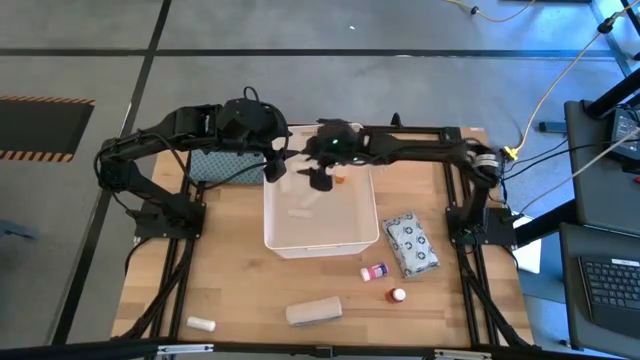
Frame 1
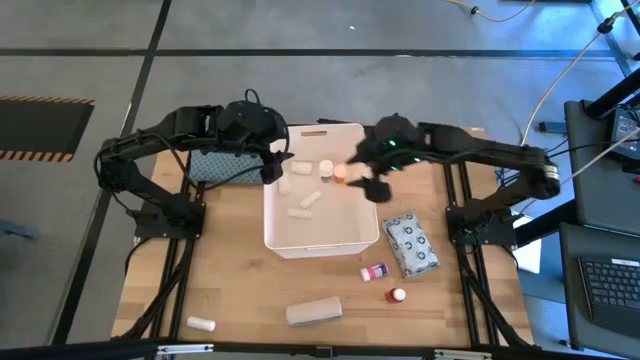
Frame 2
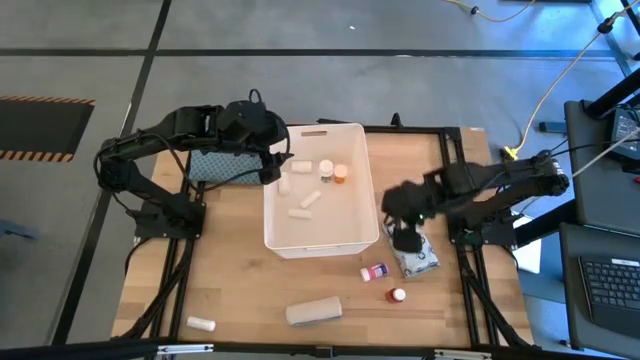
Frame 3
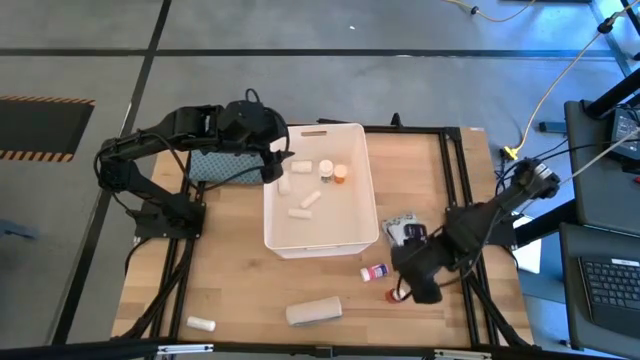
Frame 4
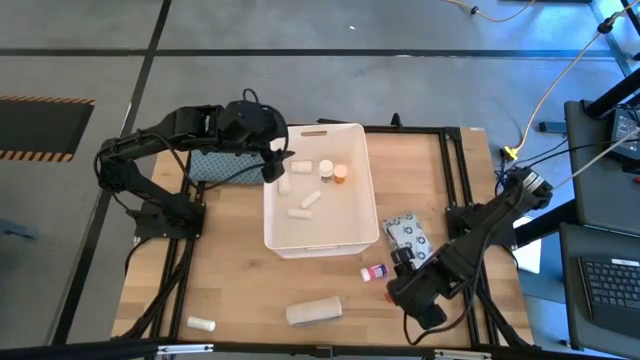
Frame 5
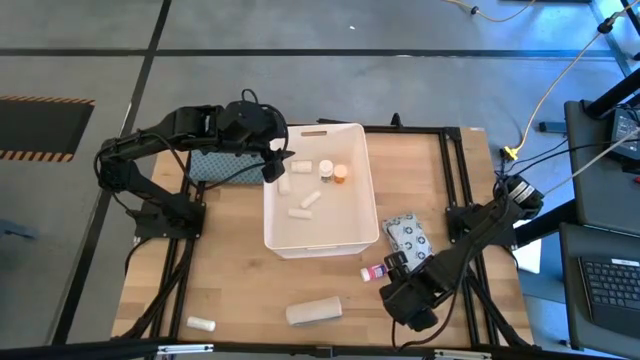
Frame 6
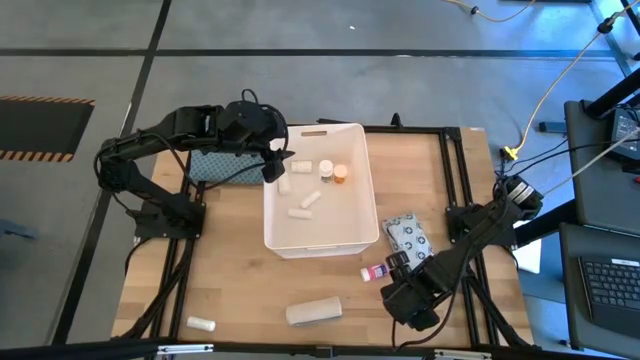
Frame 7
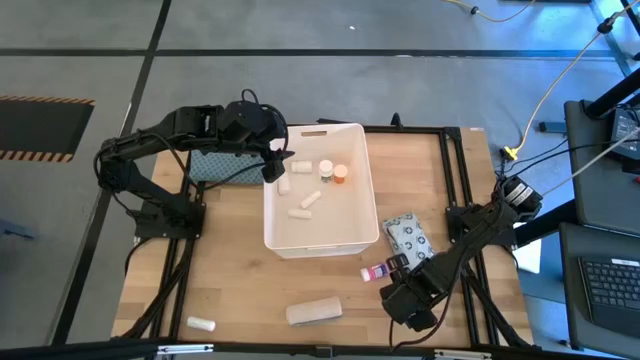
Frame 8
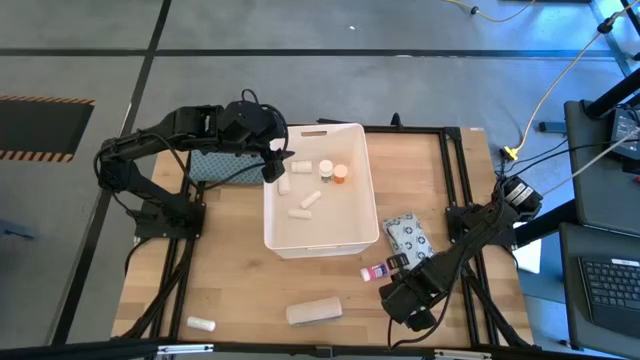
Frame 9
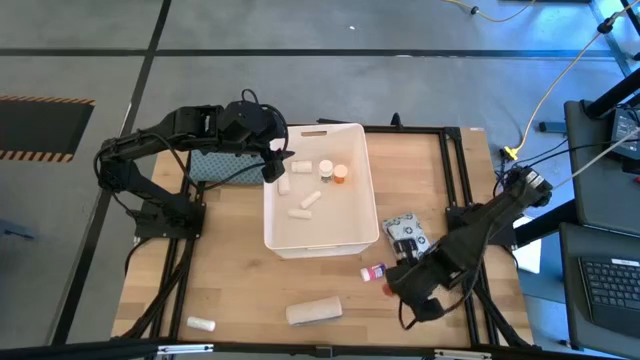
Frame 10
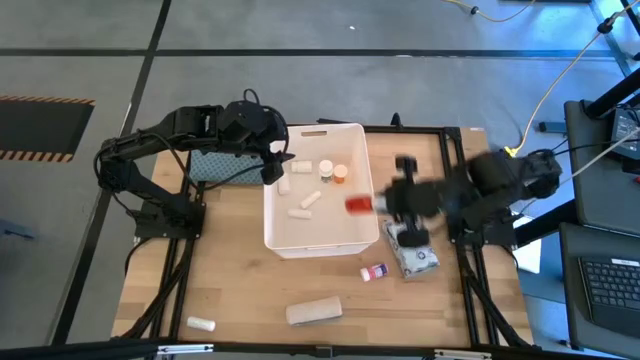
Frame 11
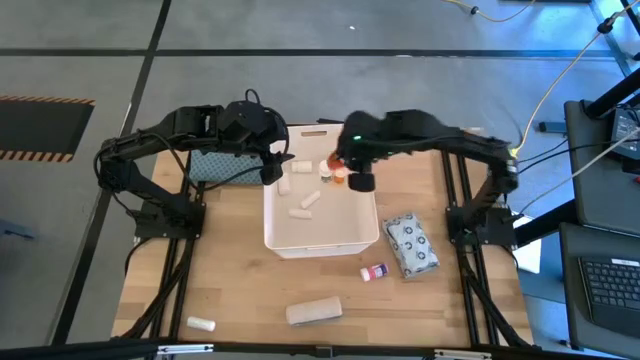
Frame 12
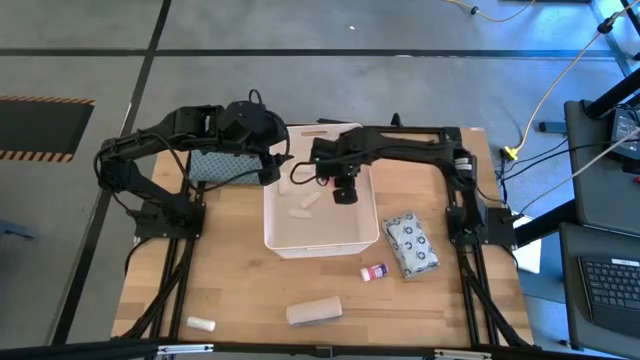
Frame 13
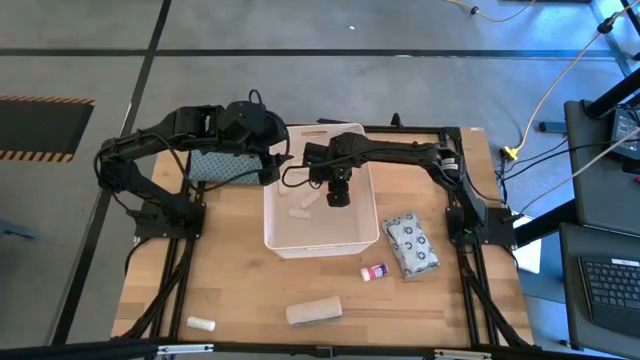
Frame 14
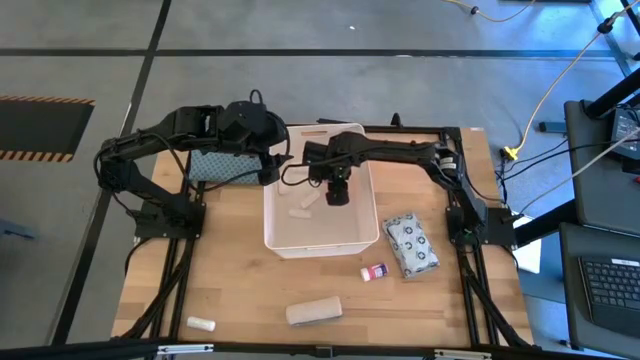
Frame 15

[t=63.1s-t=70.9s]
Task: Pick & place medical supplies in basket/bin
Put the orange medicine bottle into the white bin

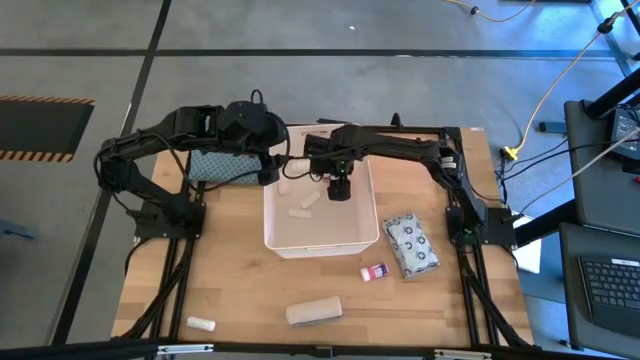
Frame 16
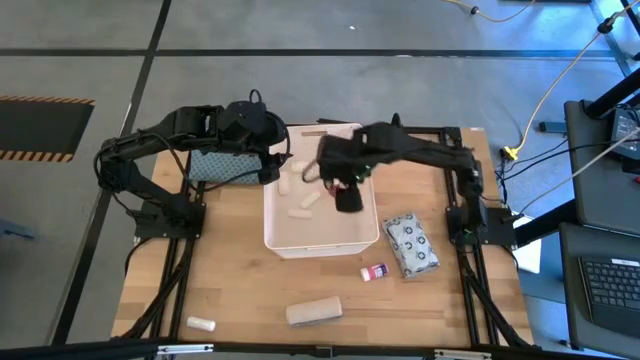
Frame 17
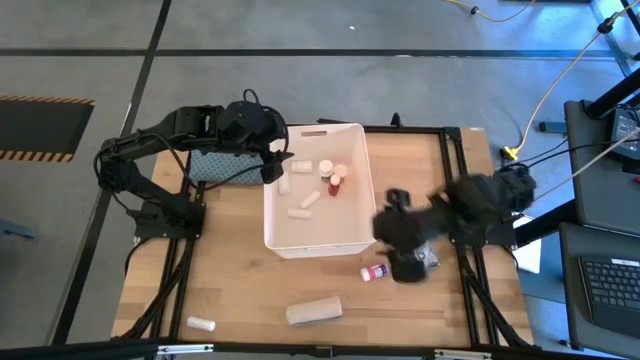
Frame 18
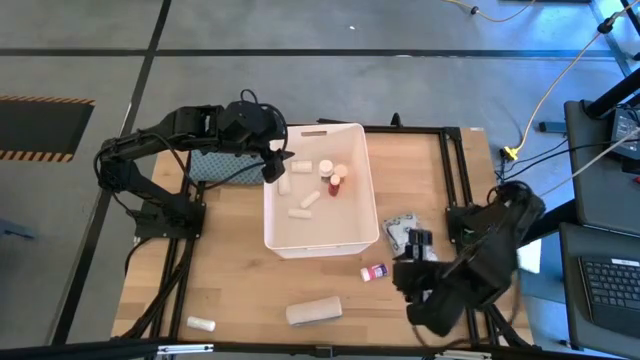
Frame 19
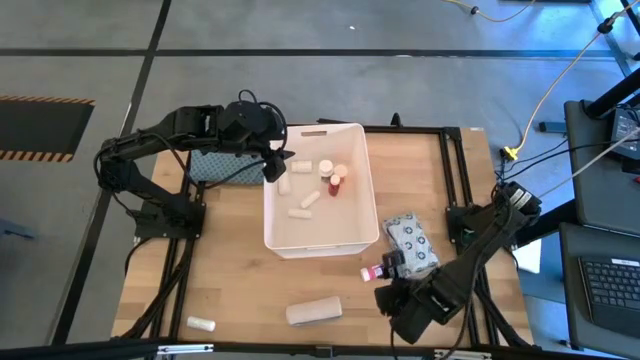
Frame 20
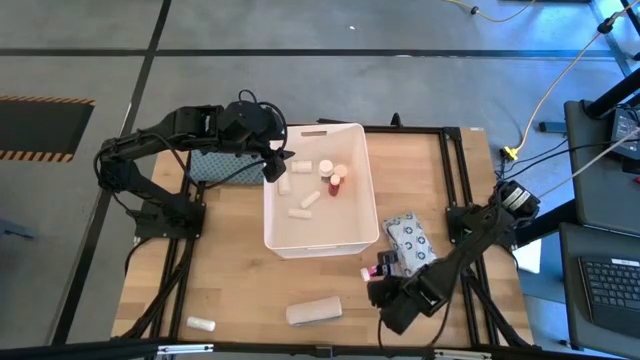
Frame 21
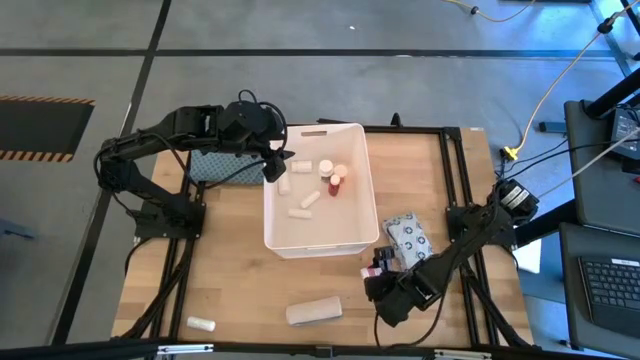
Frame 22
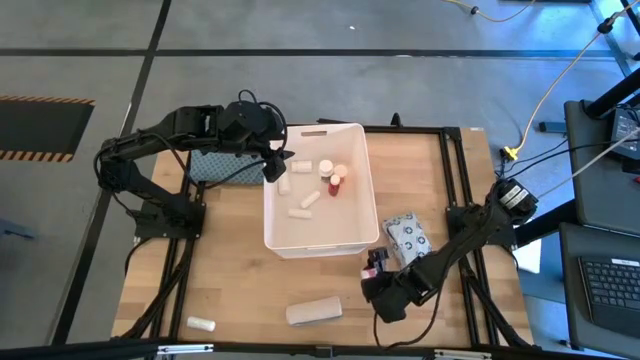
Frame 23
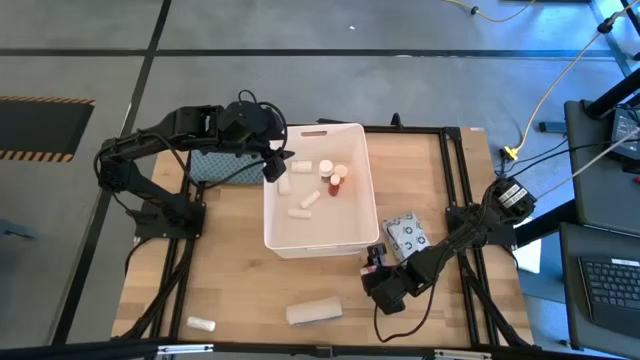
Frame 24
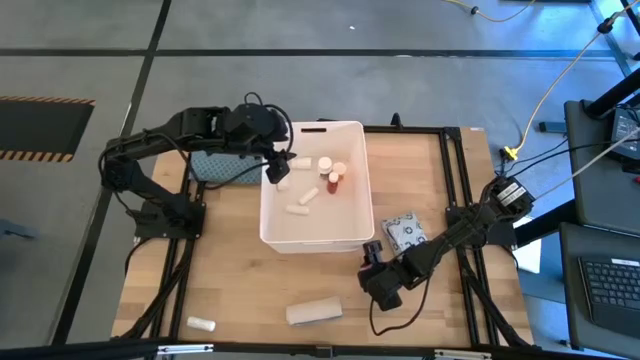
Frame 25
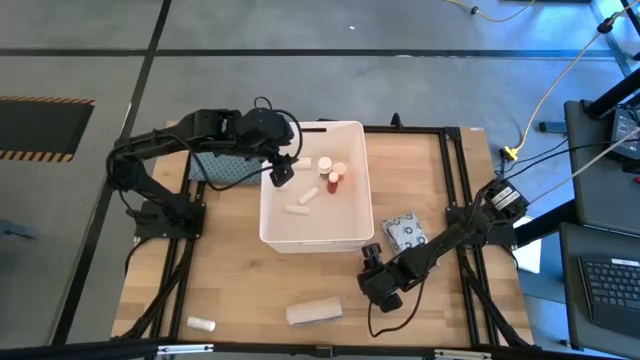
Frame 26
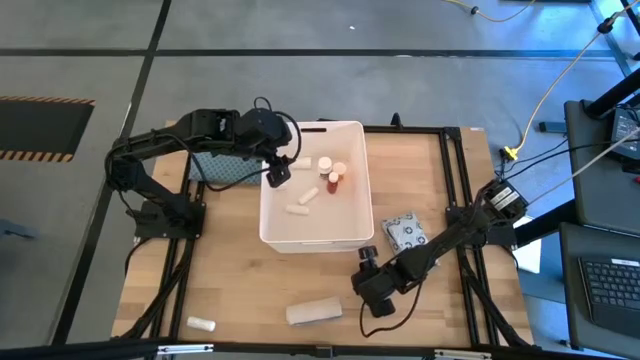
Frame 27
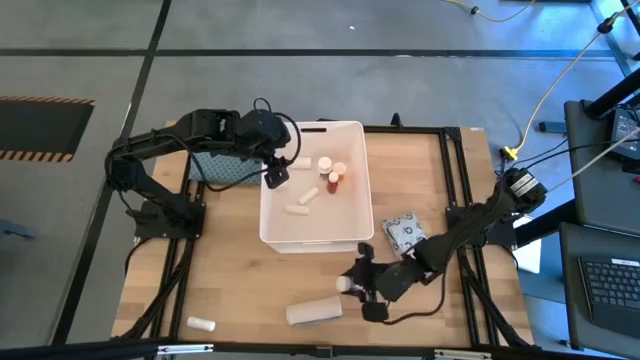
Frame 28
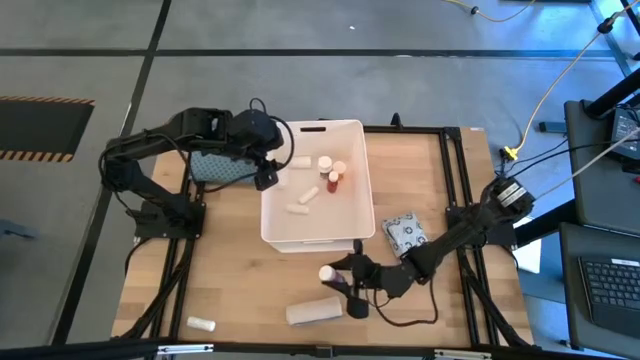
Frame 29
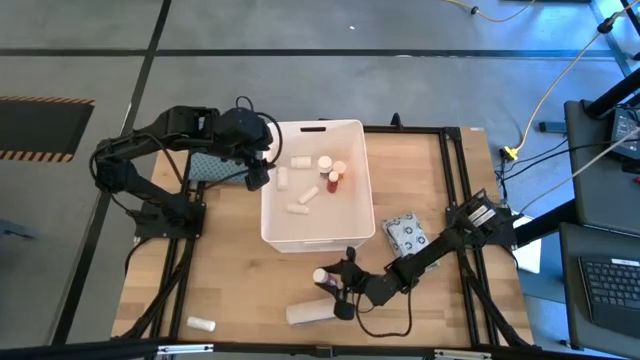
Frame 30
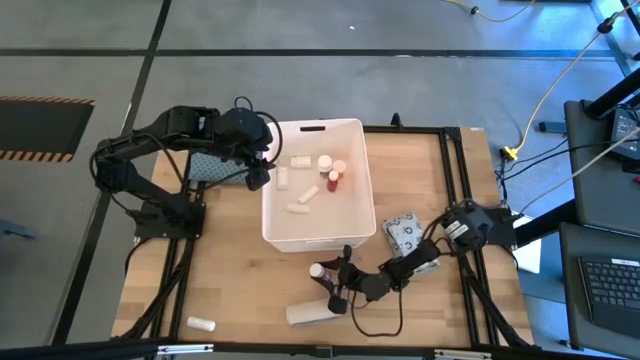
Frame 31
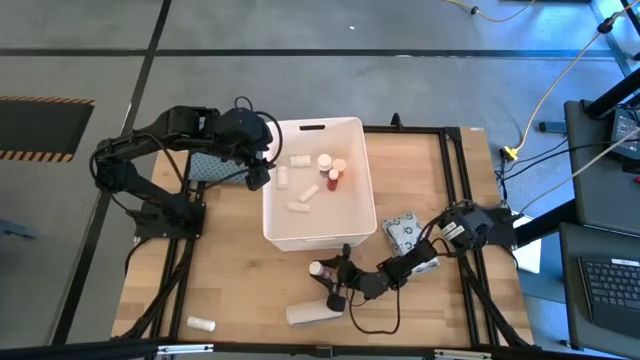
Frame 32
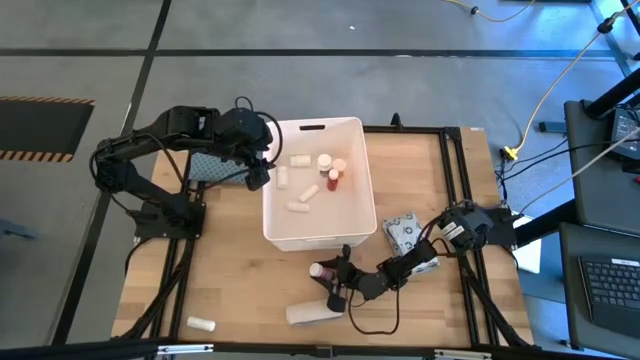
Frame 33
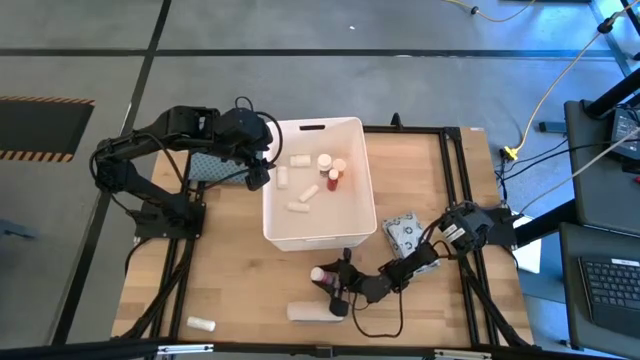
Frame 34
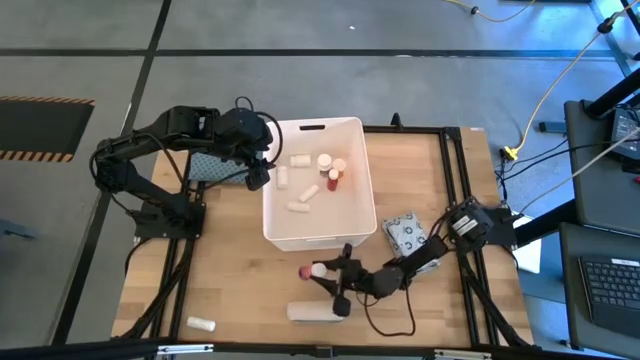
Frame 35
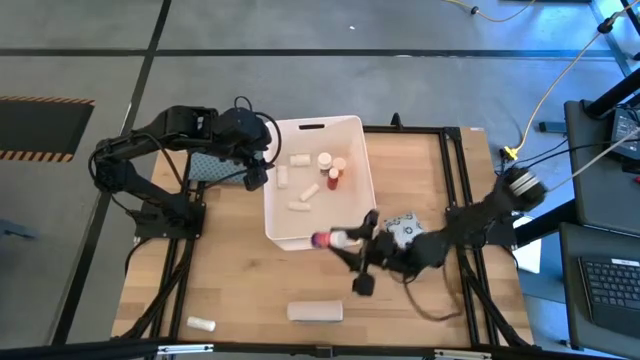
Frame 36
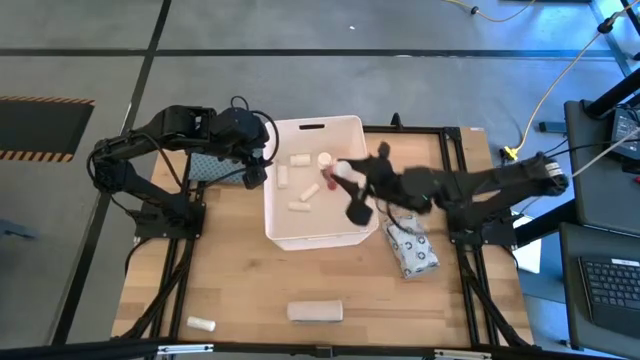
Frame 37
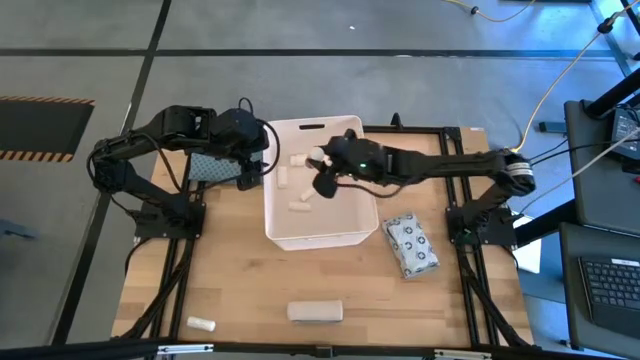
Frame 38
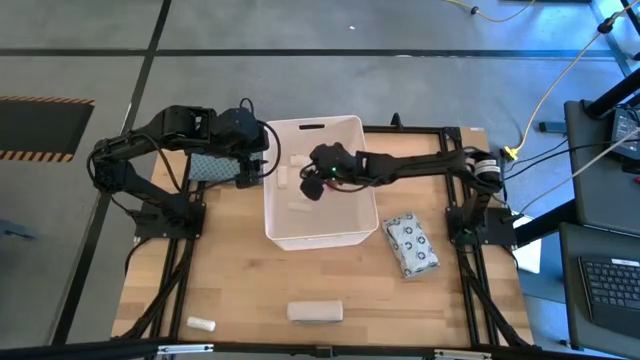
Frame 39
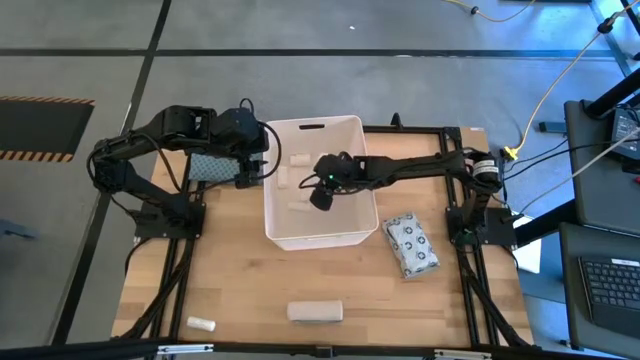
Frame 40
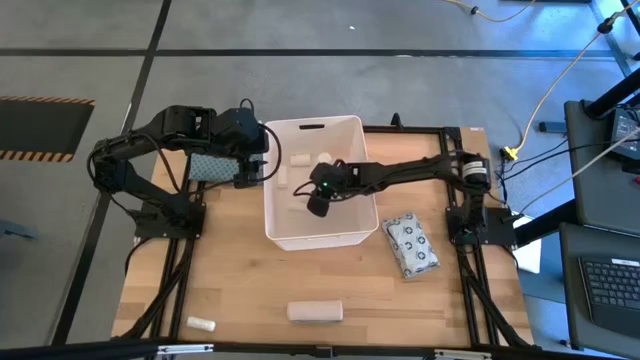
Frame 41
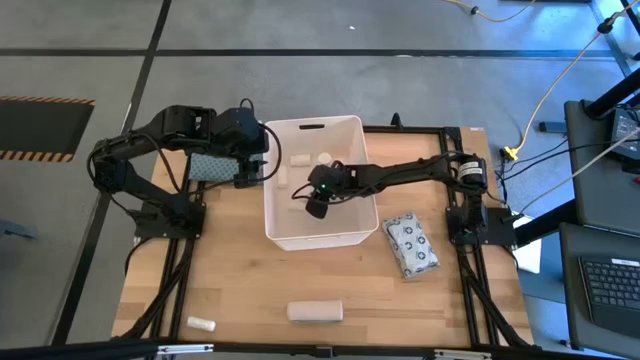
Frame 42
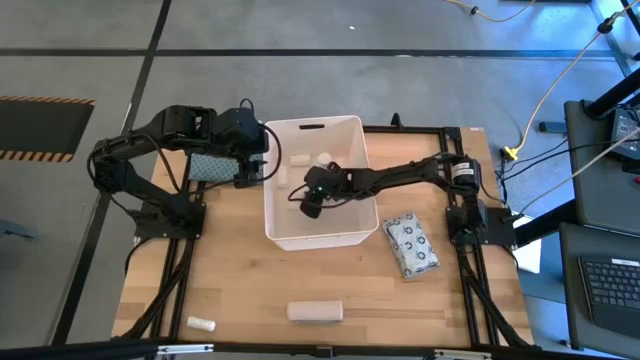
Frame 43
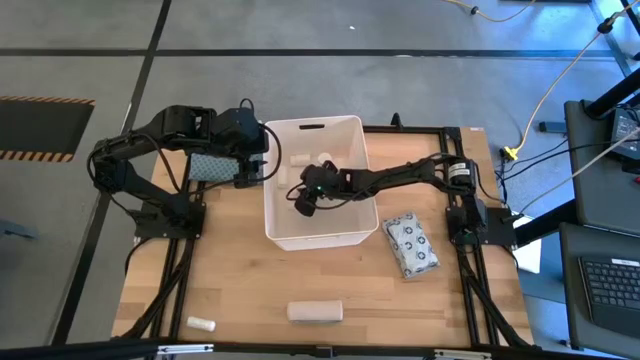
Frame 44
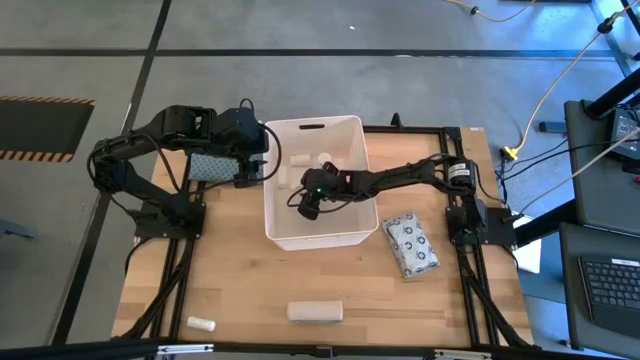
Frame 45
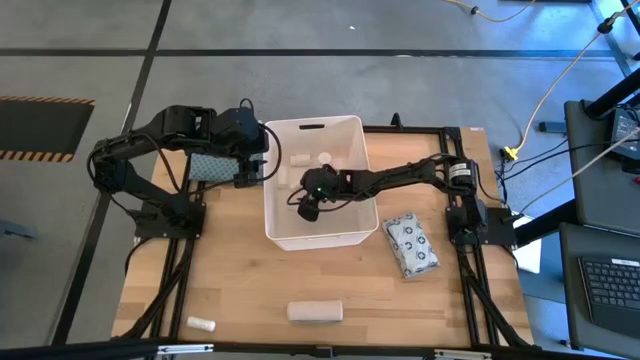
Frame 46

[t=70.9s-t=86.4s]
Put the pink medicine bottle into the white bin
